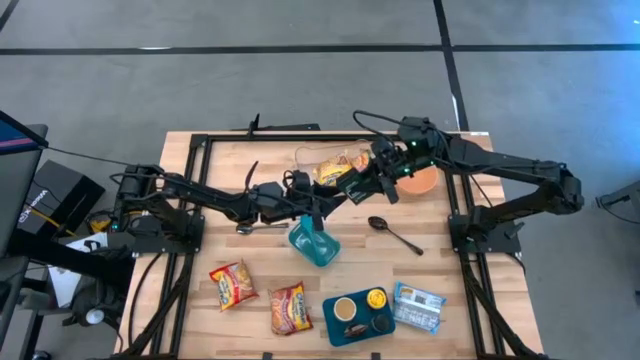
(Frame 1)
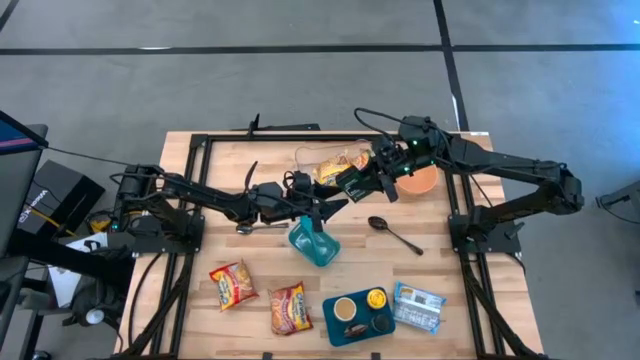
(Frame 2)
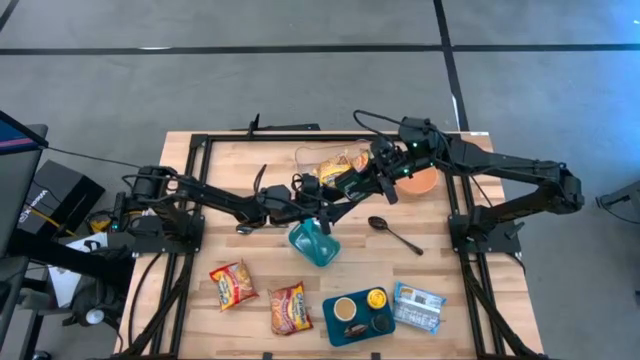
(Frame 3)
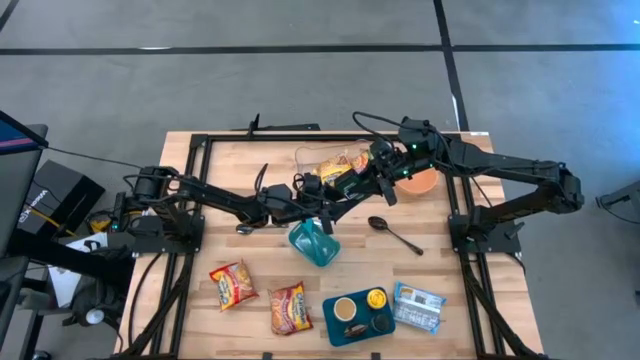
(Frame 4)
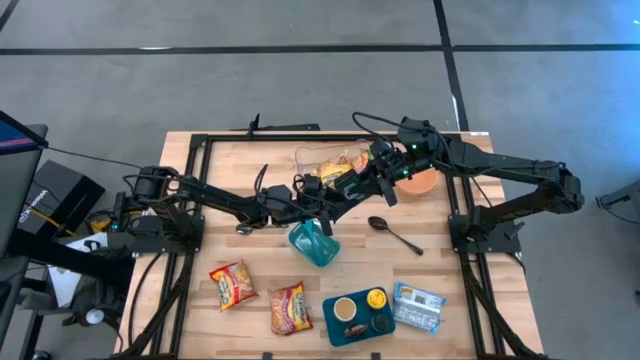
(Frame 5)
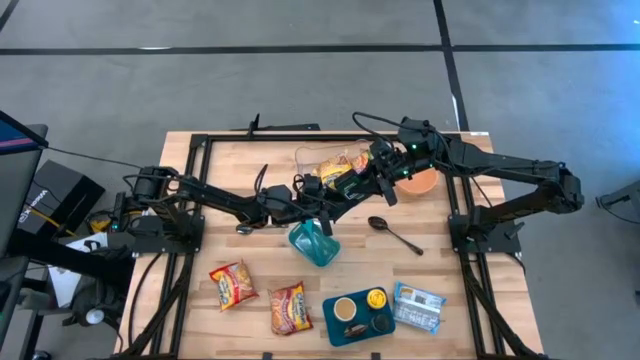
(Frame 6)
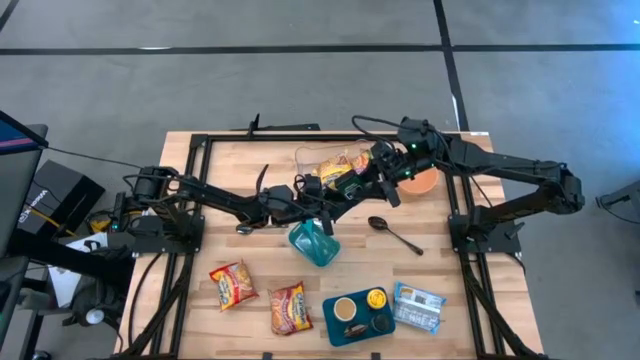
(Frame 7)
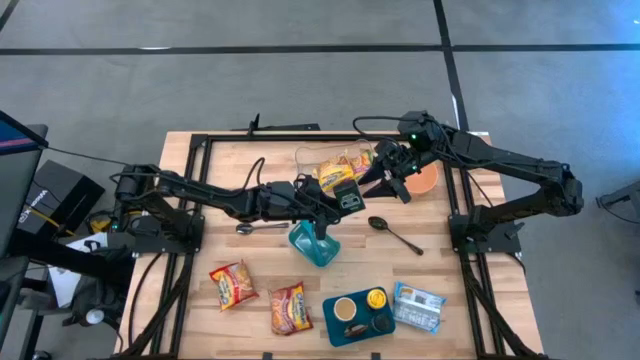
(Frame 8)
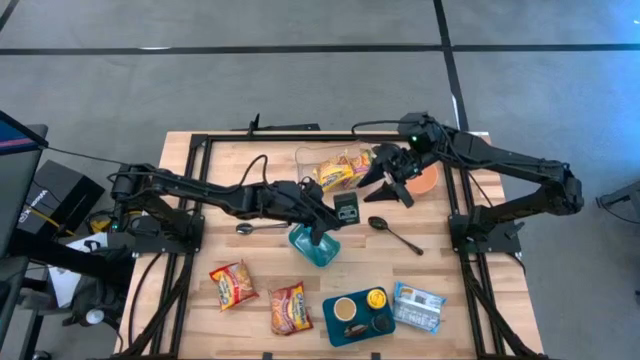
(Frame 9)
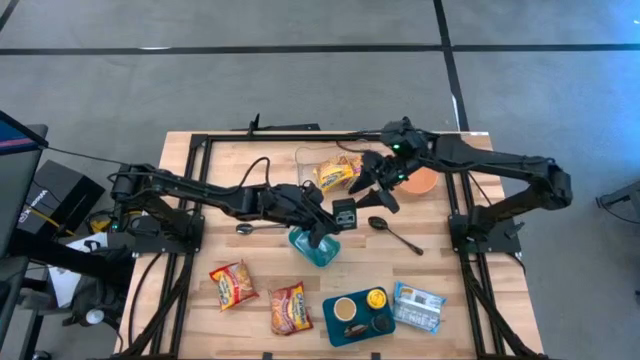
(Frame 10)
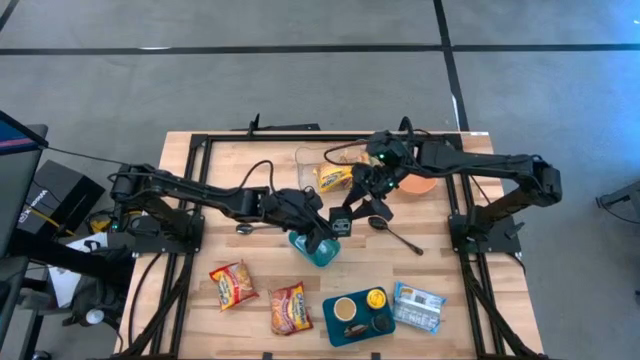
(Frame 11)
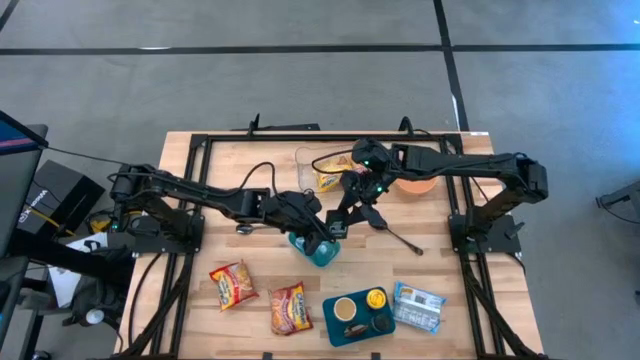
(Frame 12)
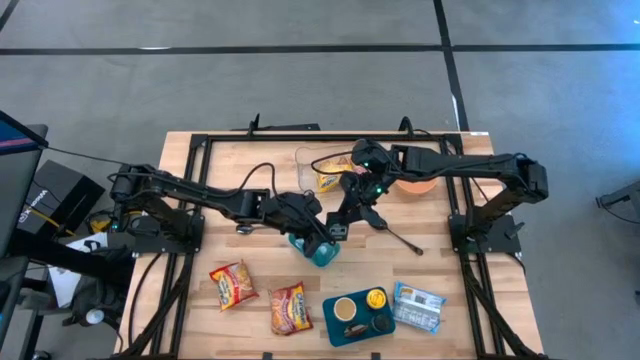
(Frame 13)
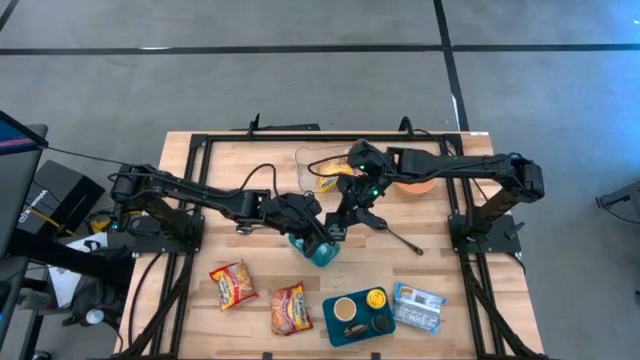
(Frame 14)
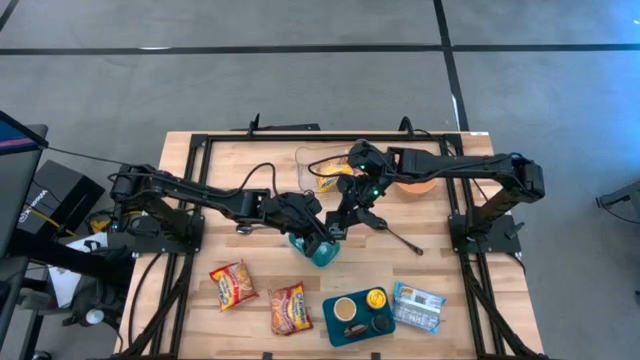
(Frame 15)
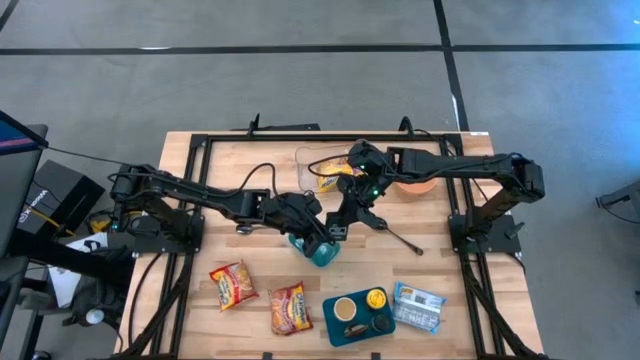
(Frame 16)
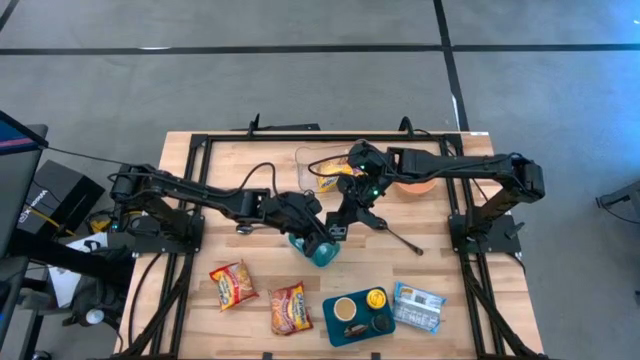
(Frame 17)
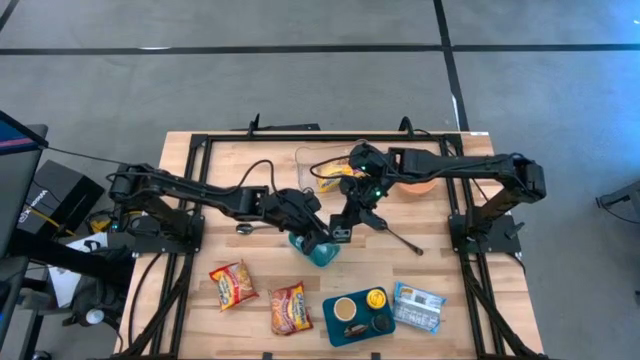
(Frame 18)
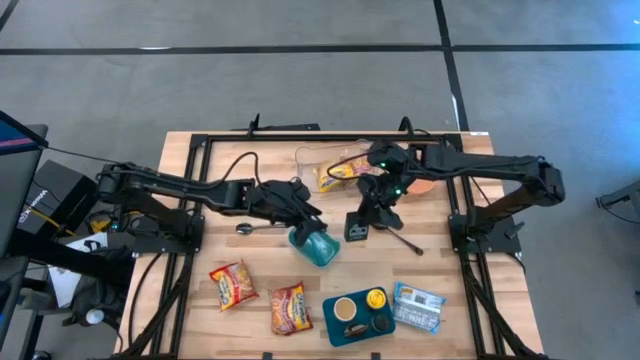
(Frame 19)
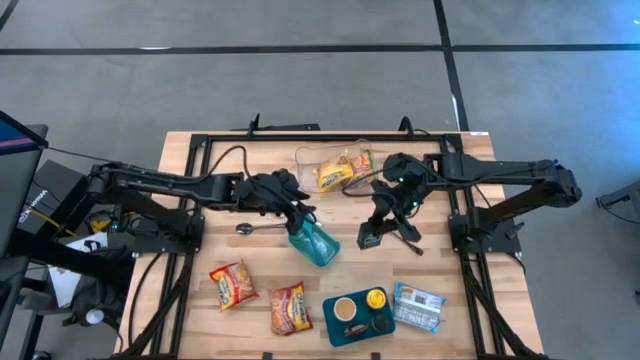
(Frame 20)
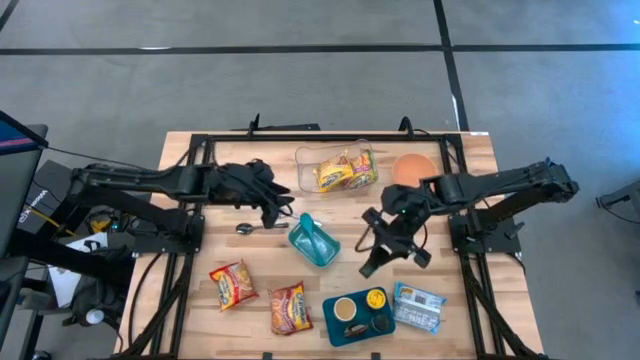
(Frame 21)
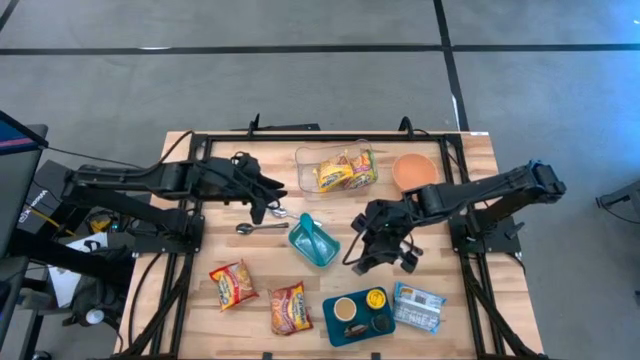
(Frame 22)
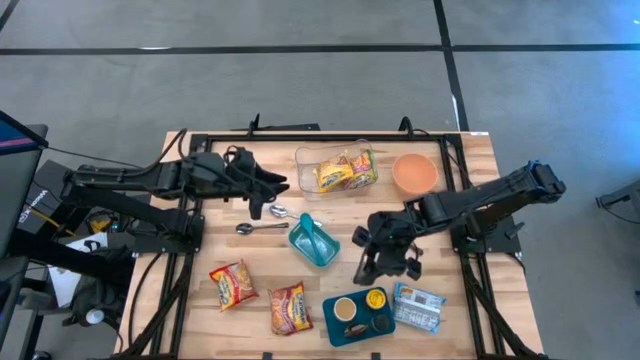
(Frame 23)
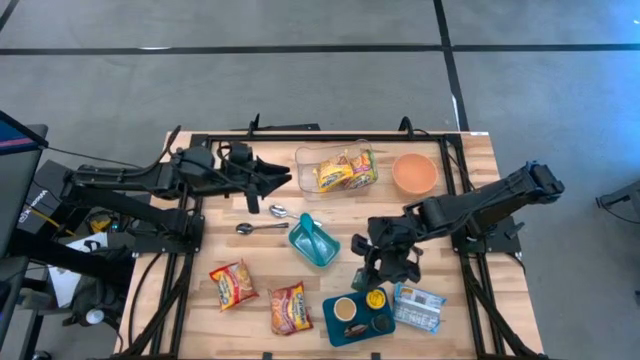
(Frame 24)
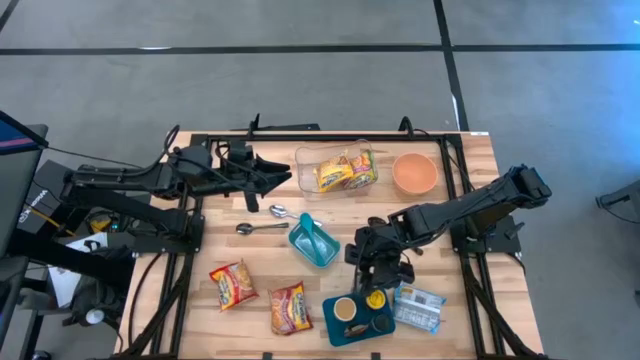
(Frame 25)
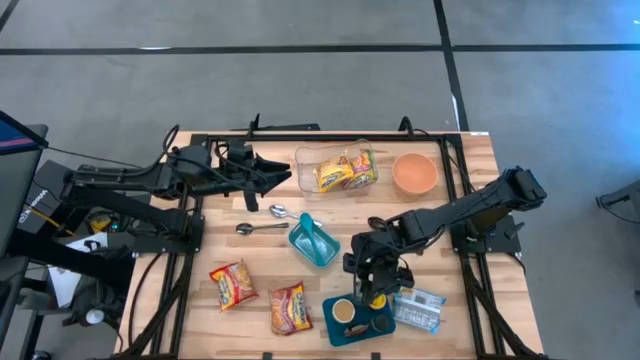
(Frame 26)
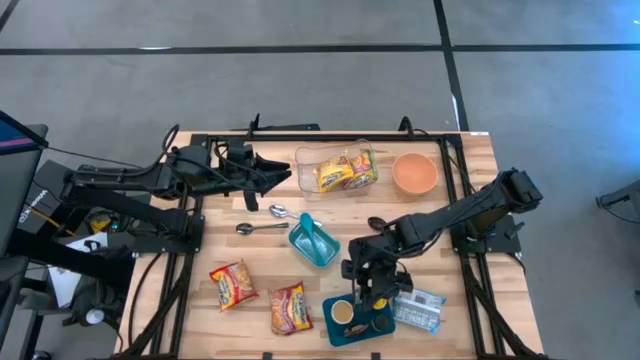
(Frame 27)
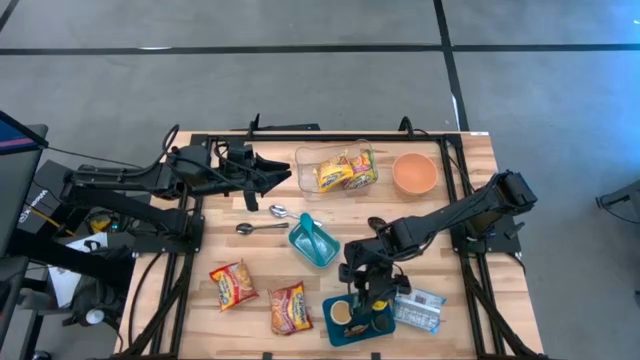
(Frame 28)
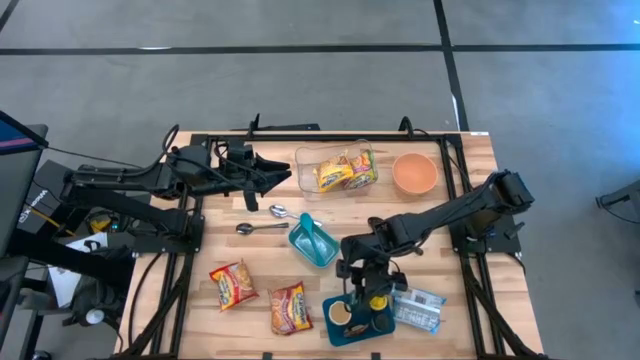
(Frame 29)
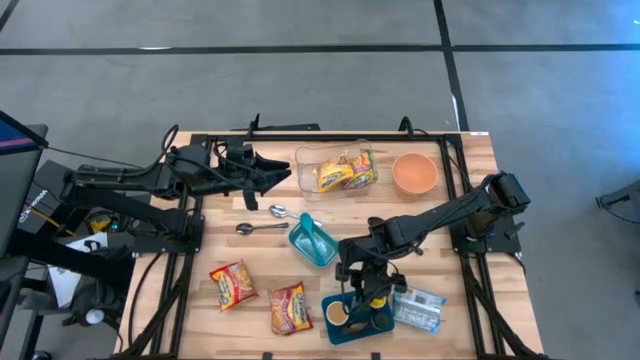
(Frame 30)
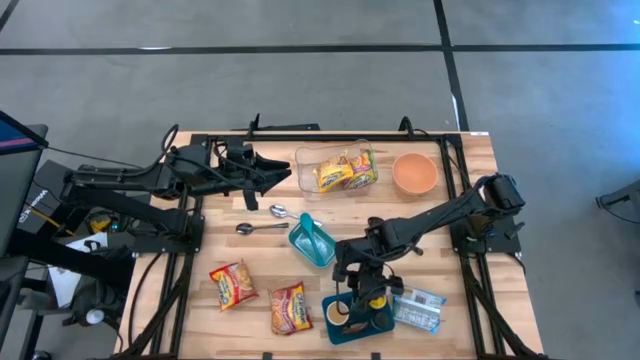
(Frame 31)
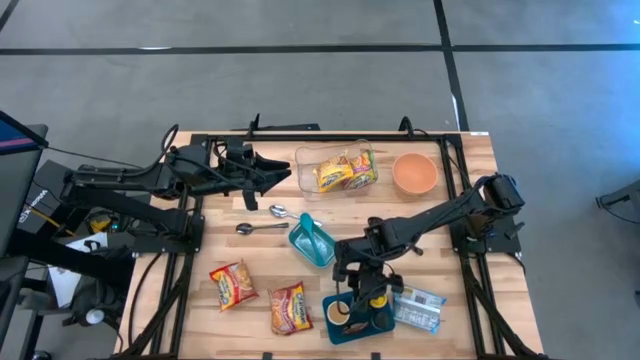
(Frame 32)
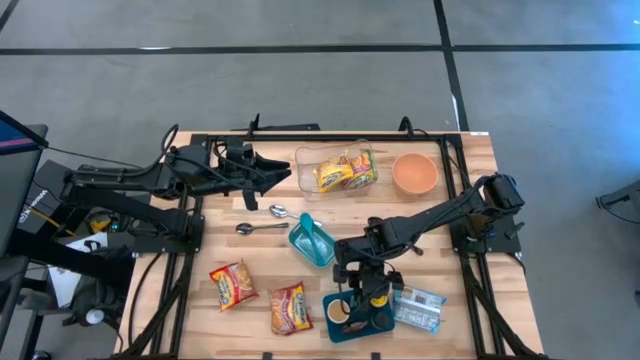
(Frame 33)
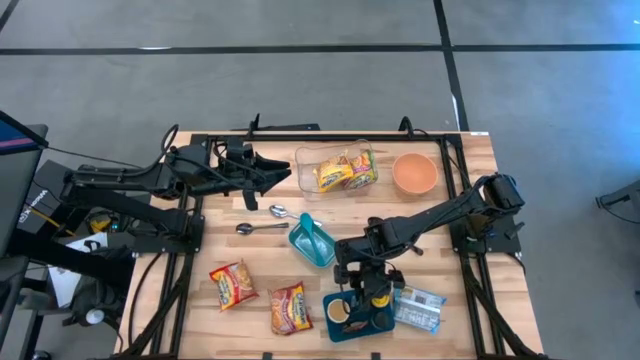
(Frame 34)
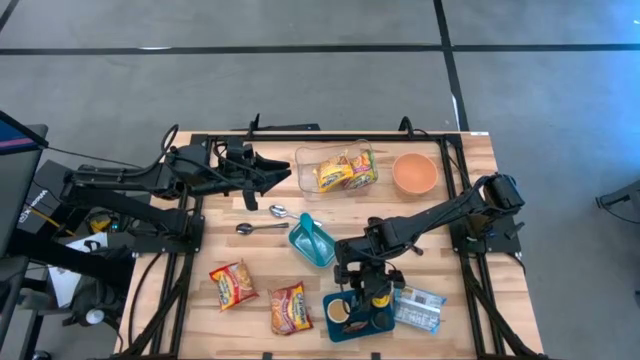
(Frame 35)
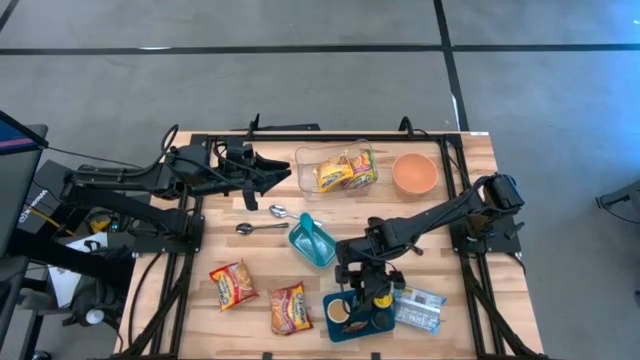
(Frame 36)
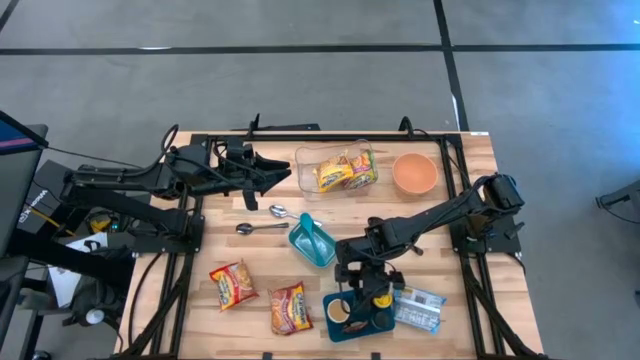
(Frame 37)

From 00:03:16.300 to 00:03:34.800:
Task: Pick & Place Food Item
Put the black seasoning can into the blue bin

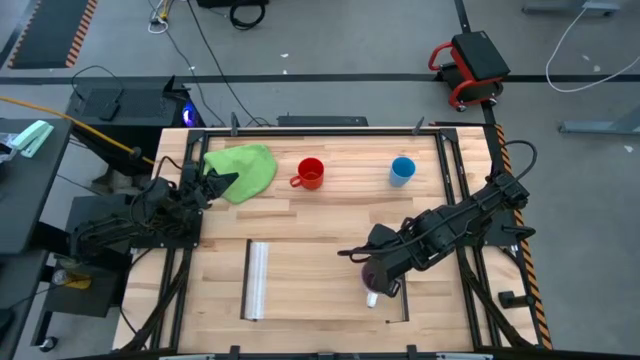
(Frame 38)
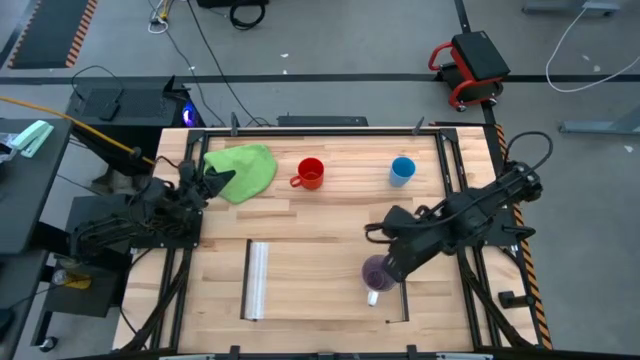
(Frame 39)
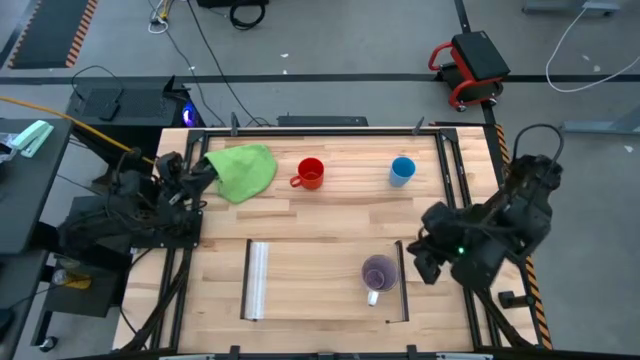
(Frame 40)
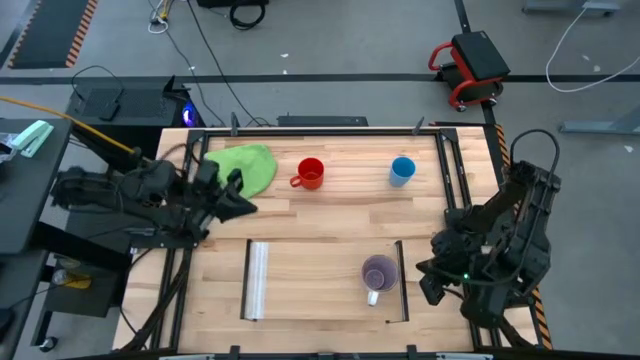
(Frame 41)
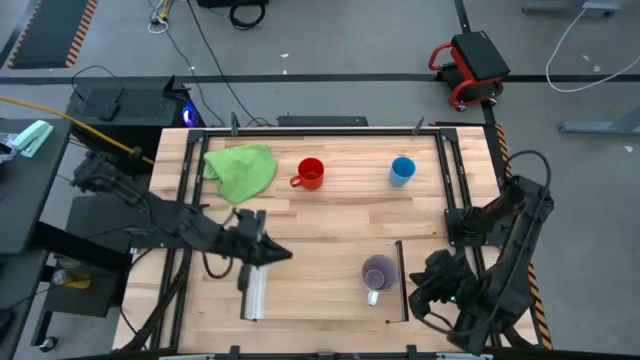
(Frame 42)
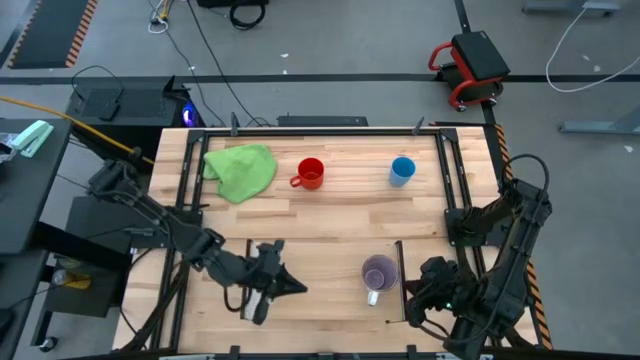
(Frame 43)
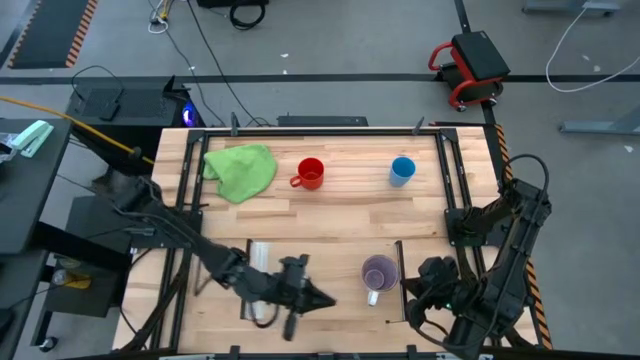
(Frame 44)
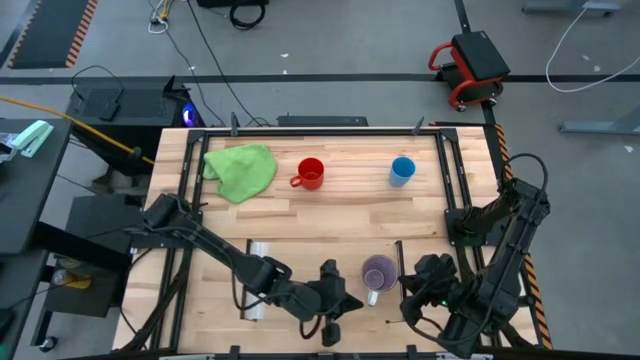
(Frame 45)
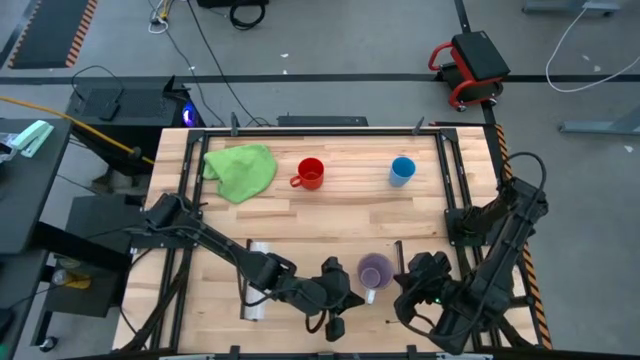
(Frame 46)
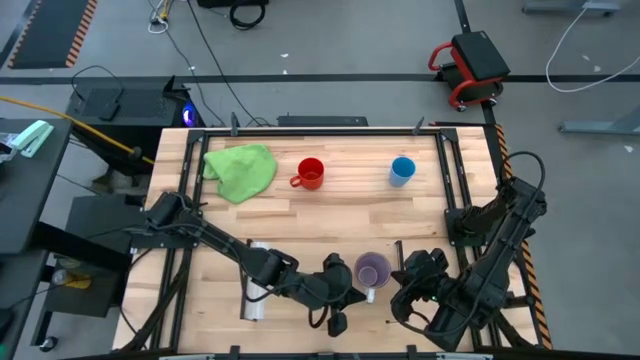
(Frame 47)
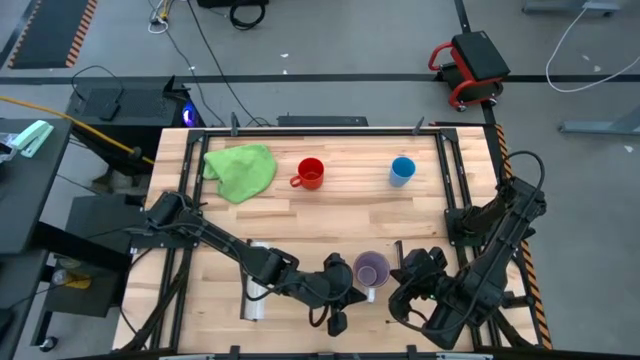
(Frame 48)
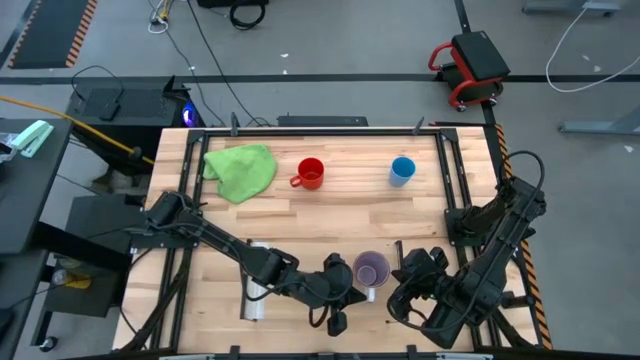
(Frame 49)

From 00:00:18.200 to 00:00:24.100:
Task: Stack small to large cups/mugs on shelf
Adjust the purple mug on the shelf
